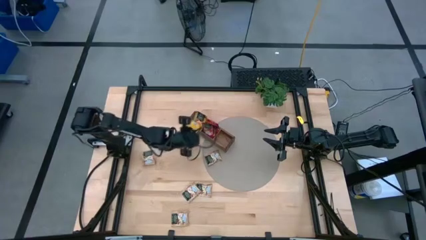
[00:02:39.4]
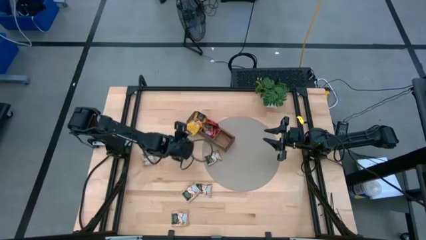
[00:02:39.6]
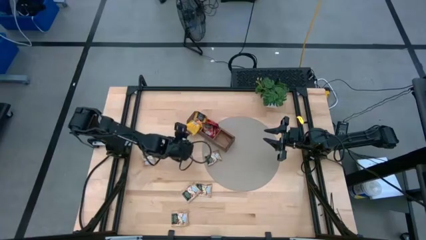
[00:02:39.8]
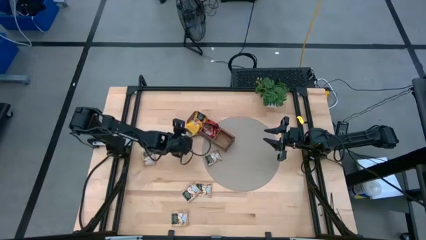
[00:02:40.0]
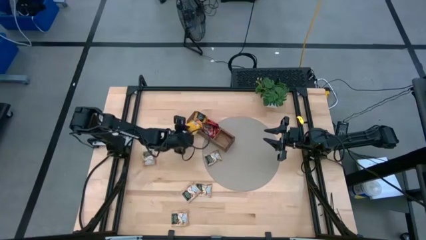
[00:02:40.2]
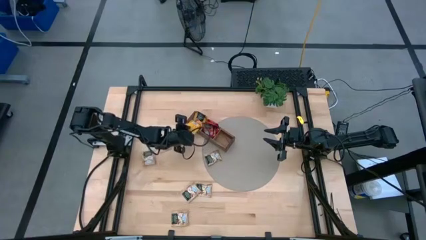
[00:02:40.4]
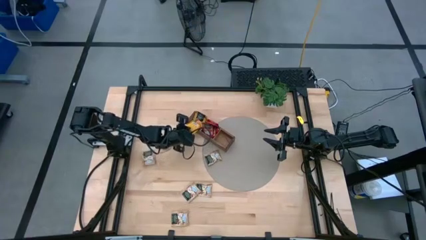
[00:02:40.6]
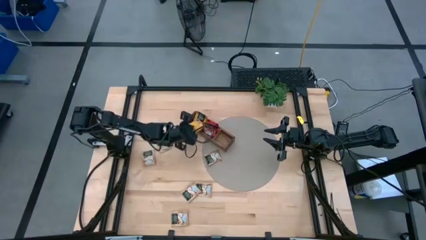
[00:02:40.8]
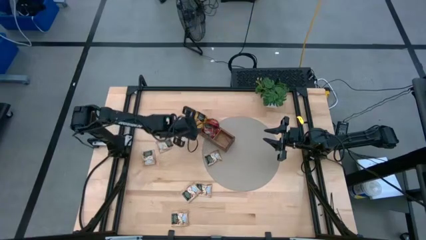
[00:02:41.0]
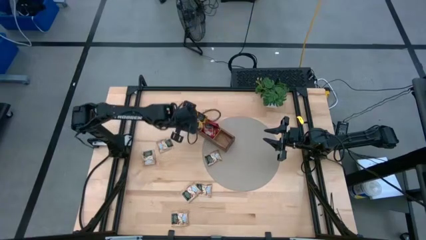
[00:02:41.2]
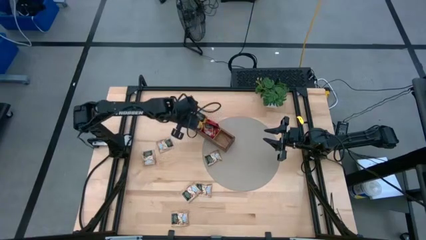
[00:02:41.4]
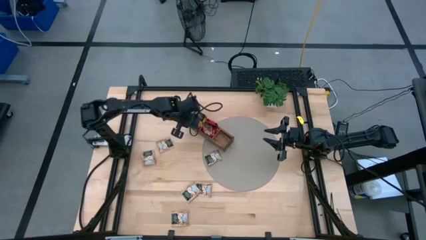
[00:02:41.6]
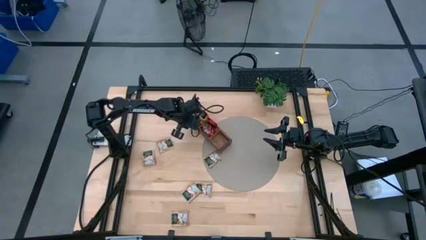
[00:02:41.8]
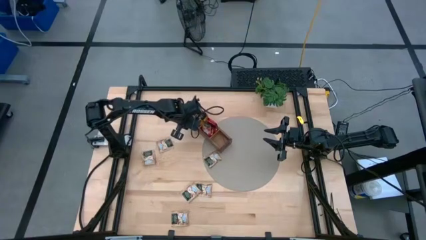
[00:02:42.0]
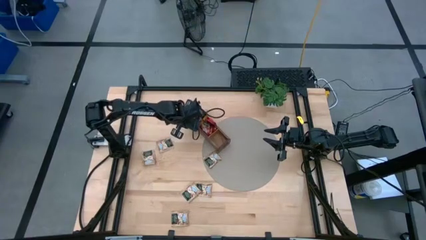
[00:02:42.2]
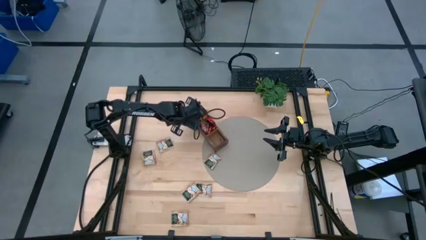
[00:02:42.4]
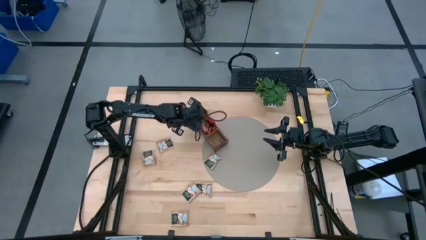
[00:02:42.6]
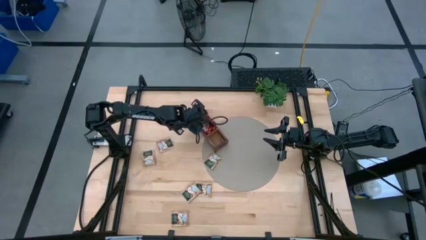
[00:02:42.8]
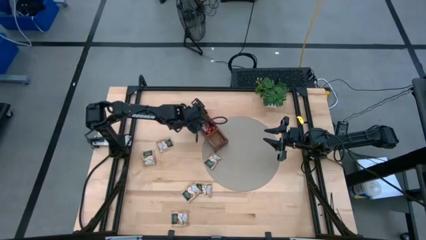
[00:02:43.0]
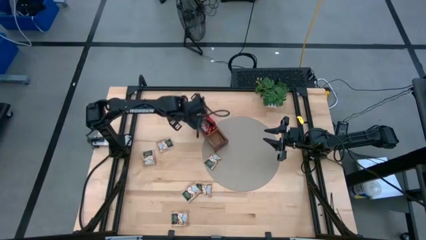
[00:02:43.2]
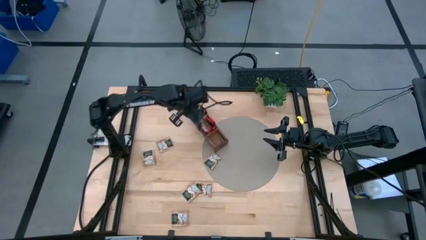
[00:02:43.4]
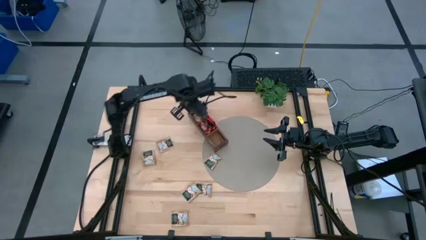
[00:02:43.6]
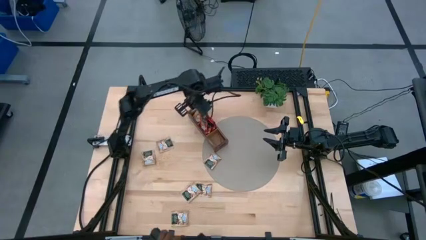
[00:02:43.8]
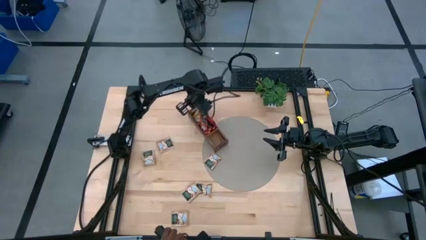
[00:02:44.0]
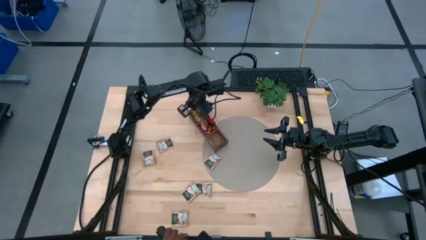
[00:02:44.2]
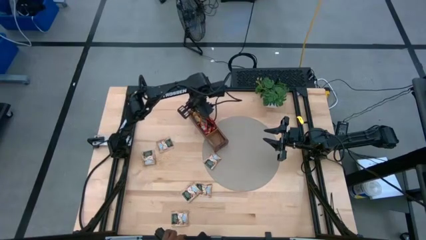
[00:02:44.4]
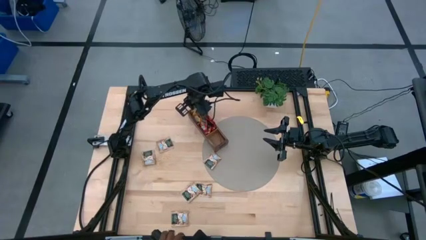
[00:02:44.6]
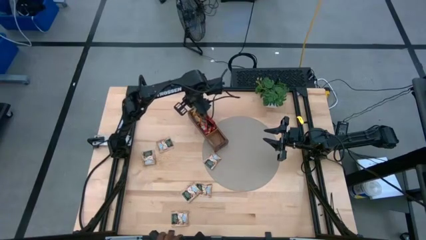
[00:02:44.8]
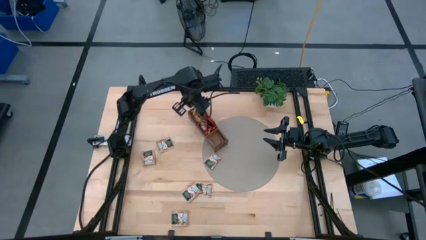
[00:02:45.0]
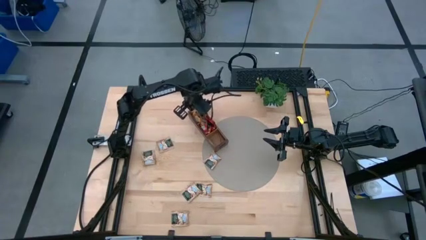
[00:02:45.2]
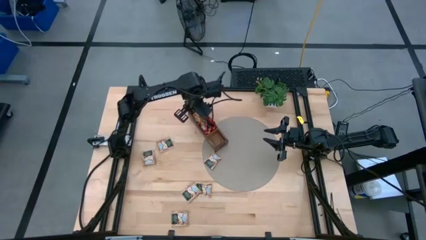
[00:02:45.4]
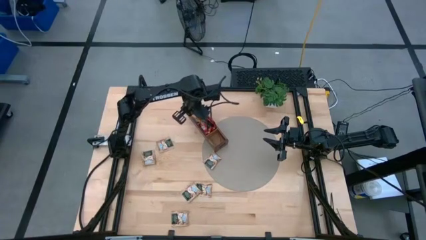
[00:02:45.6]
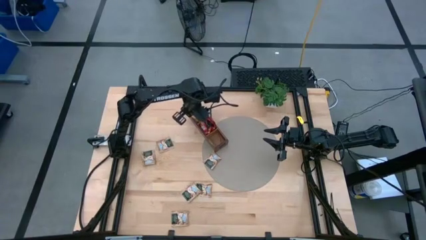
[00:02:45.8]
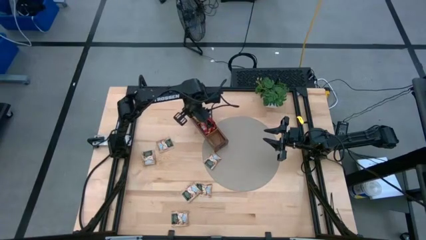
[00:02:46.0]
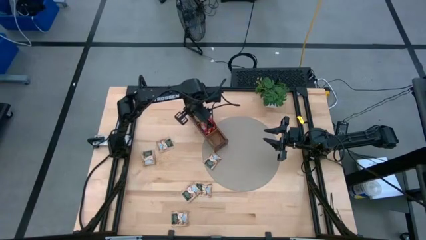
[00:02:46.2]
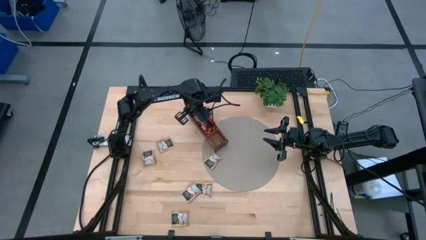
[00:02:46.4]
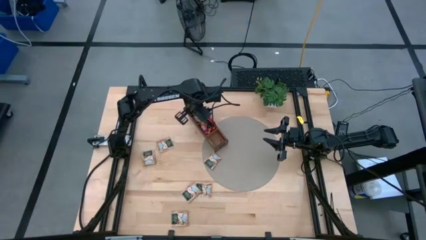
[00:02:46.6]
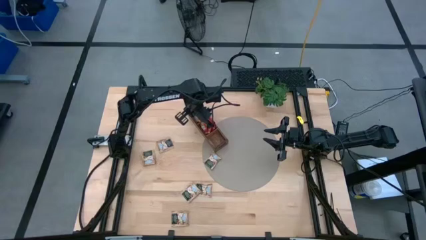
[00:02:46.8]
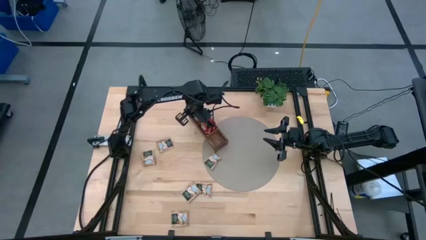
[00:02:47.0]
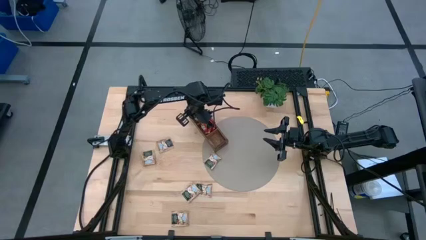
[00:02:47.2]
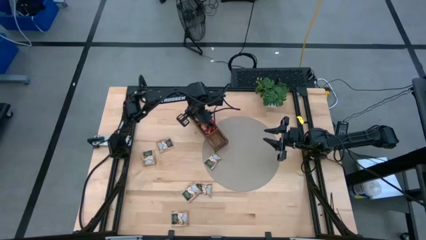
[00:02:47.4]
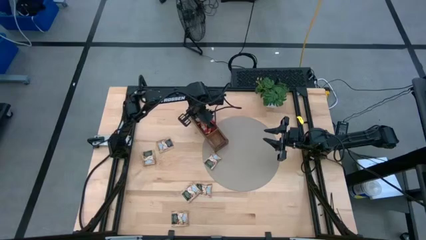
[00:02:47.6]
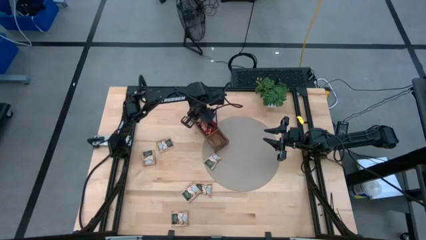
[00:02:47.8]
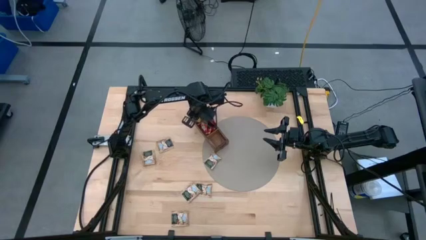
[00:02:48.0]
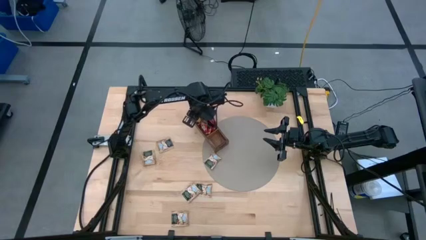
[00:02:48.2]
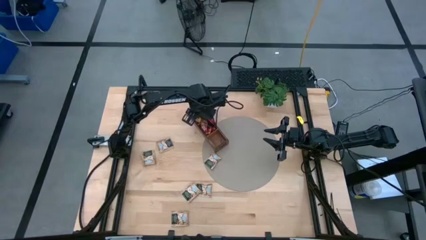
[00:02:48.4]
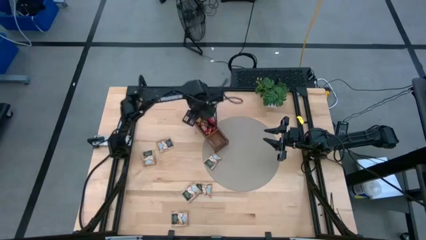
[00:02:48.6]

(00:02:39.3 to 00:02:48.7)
Task: Pick & Place Tea
Adjust the yellow tea bag in wooden organizer

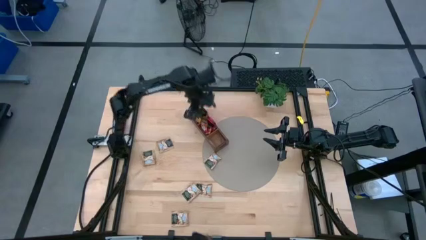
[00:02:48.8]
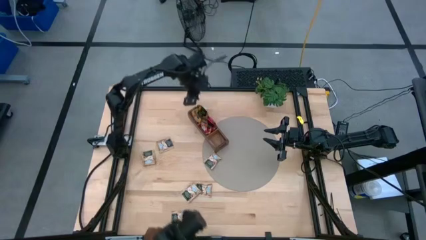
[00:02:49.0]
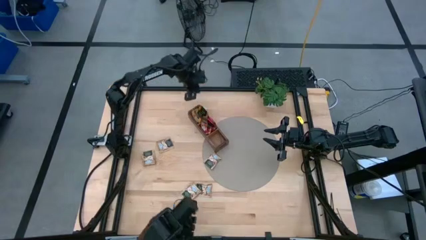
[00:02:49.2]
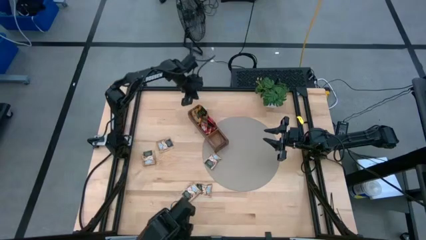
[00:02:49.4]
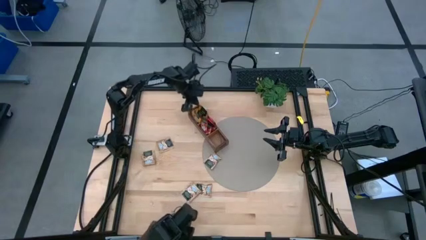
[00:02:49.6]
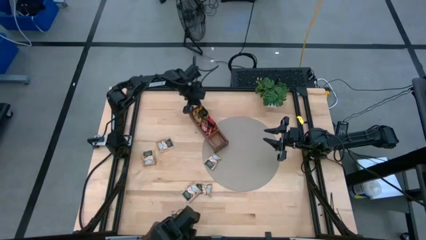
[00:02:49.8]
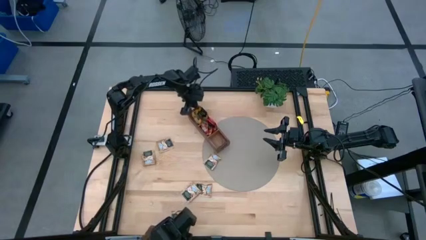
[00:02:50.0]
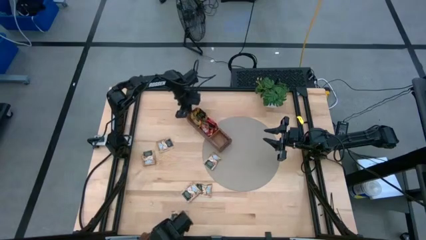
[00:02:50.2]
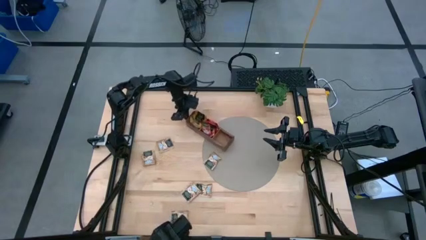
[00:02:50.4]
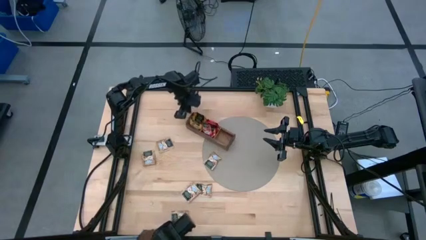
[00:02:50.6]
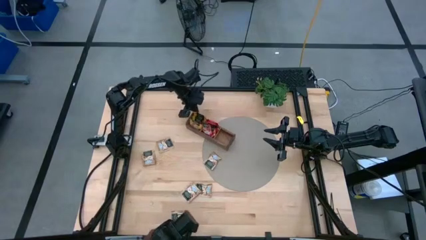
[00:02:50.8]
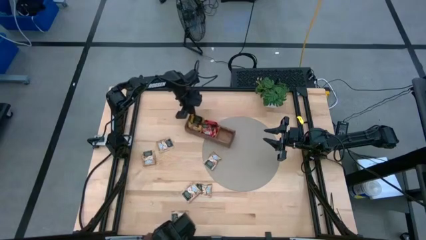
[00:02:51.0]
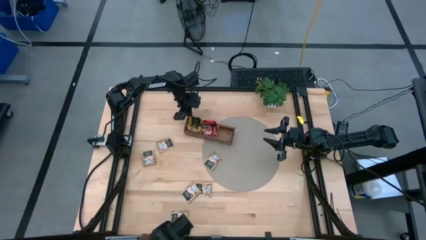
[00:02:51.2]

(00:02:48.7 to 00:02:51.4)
Adjust the wooden organizer on the table

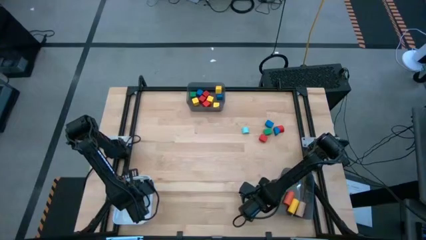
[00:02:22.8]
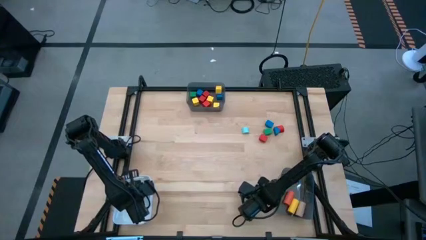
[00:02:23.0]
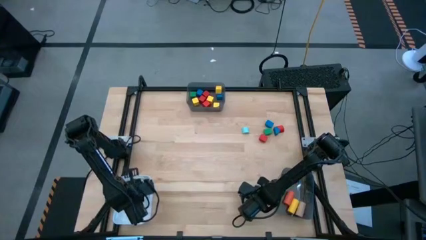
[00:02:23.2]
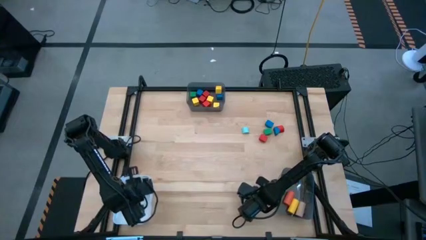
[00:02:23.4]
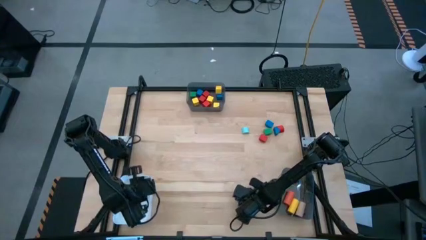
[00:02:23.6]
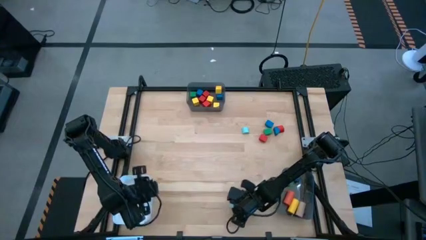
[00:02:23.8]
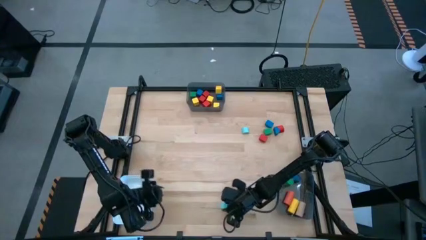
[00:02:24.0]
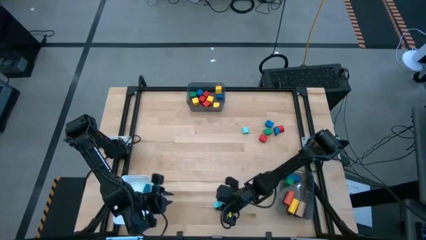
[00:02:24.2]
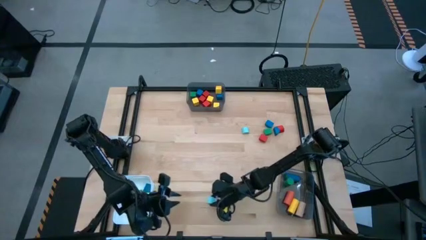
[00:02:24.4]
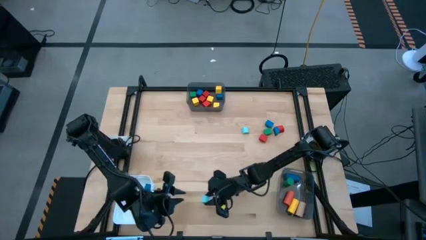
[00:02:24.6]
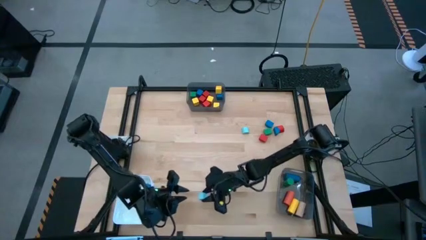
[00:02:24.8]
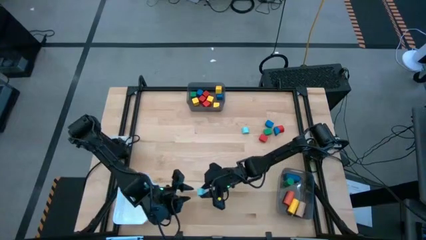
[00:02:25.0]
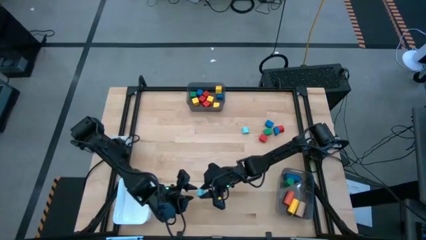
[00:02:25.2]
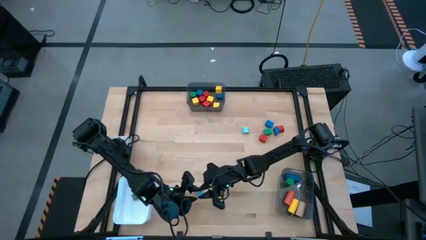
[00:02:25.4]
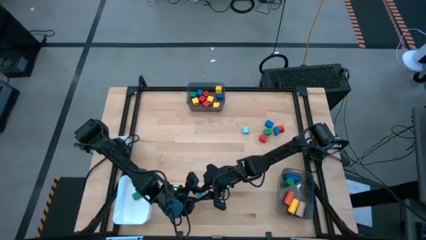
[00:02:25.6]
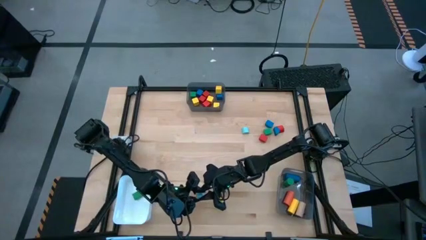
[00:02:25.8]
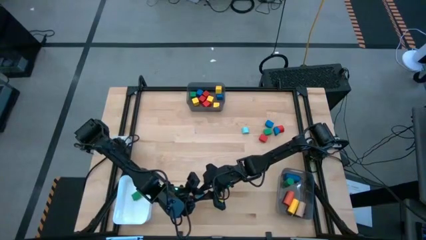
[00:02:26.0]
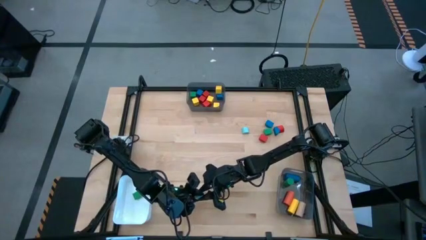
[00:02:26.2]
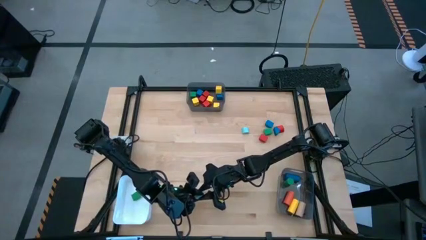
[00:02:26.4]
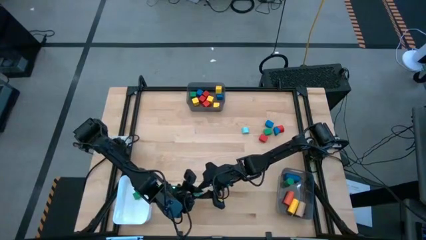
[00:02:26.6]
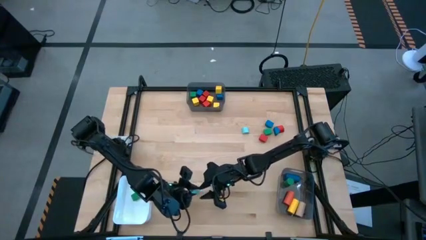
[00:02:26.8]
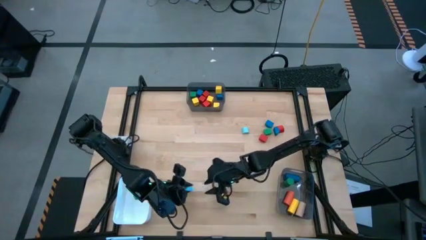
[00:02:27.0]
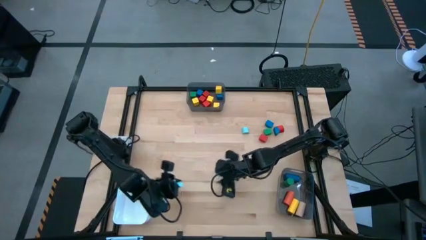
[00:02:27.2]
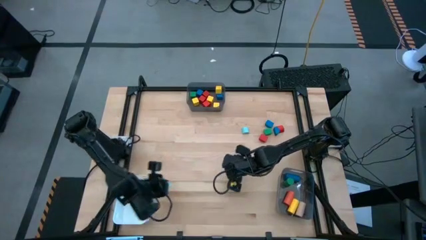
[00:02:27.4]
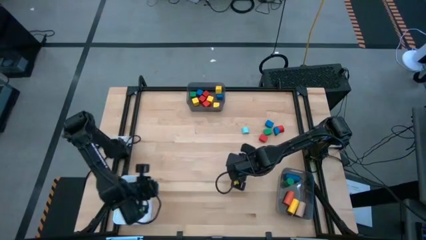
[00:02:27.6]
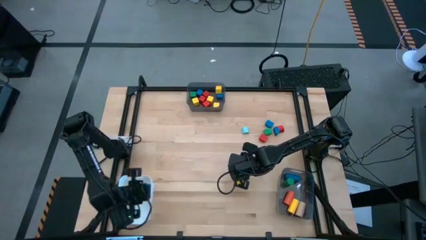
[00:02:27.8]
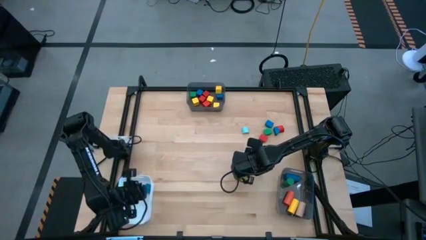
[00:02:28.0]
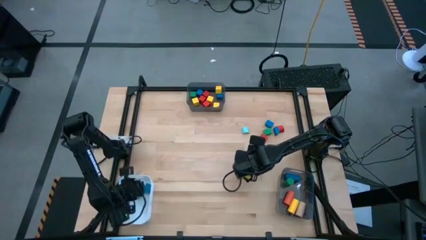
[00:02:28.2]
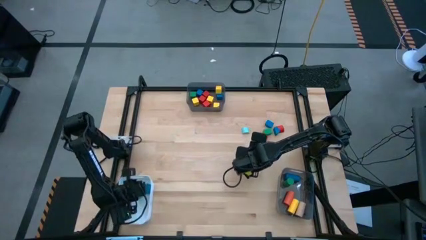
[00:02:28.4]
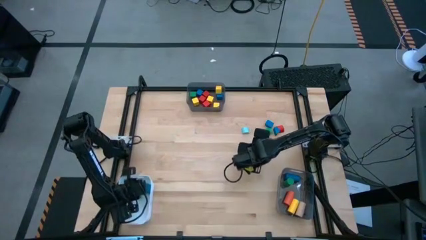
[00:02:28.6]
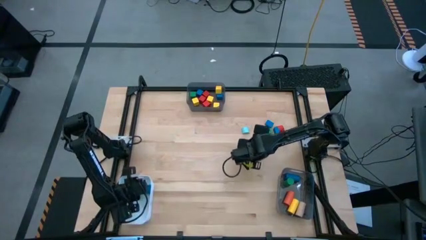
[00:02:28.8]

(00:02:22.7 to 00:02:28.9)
Task: Sort blocks by size
Put the light blue half circle block into the white bin
